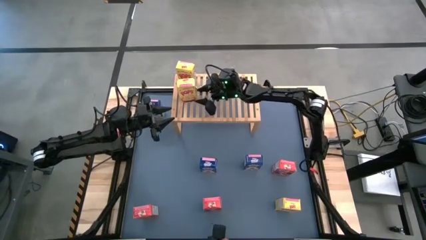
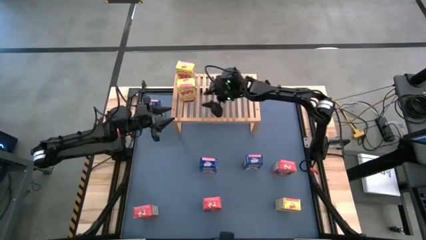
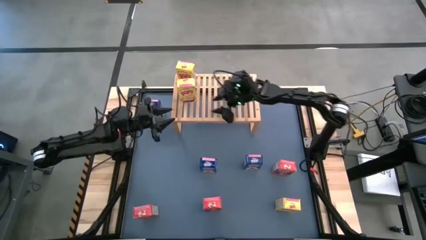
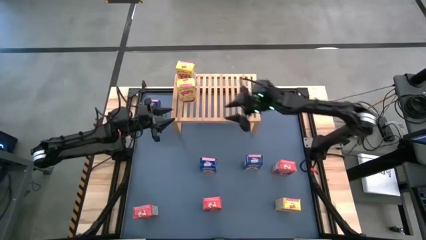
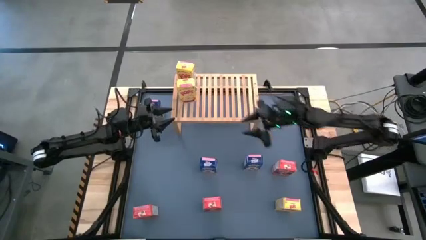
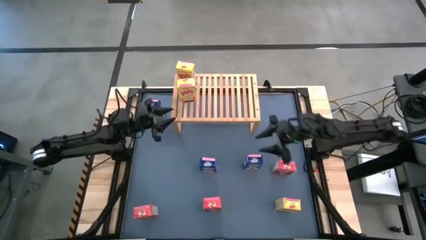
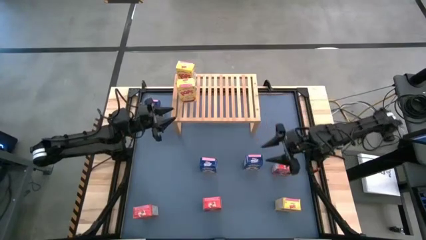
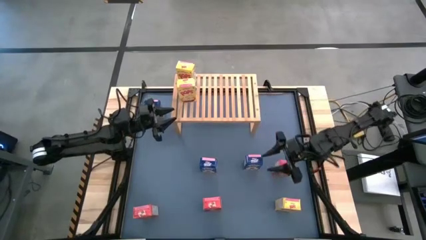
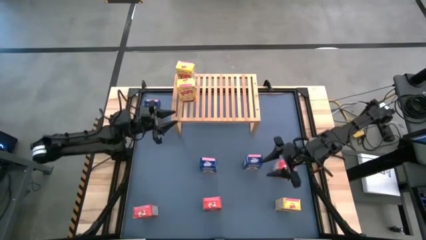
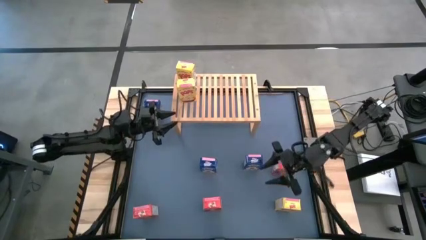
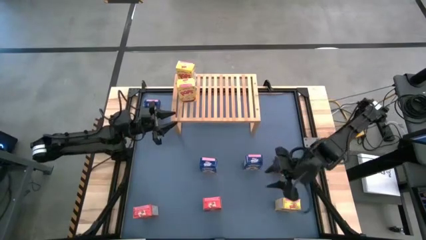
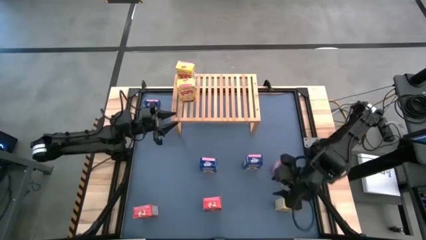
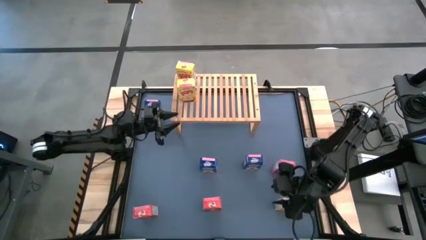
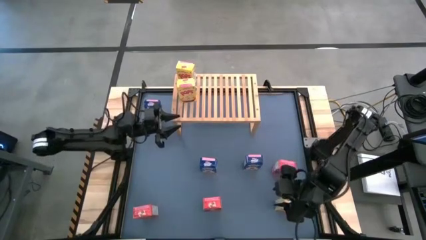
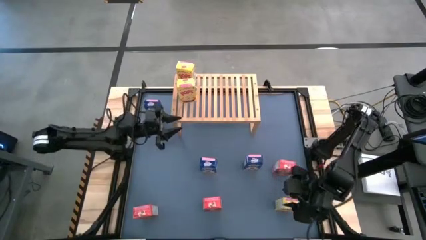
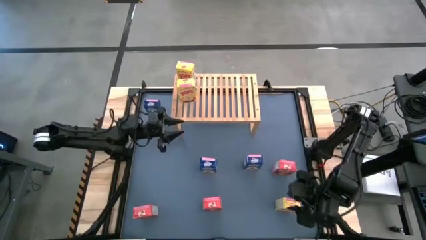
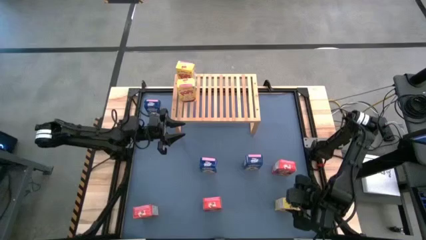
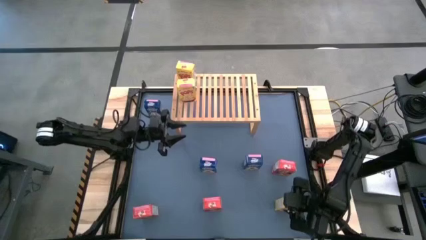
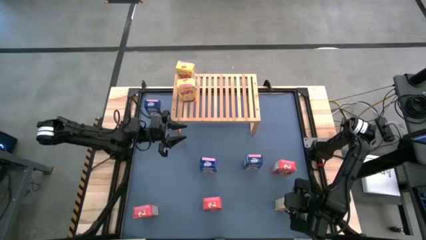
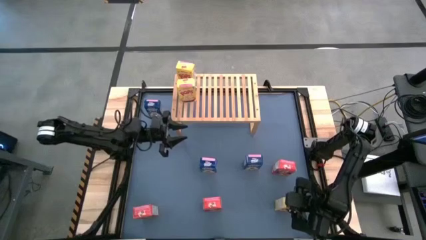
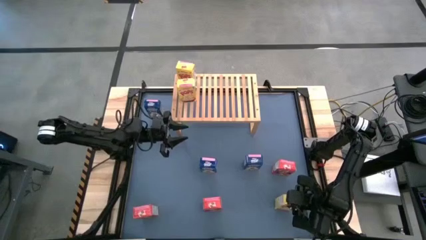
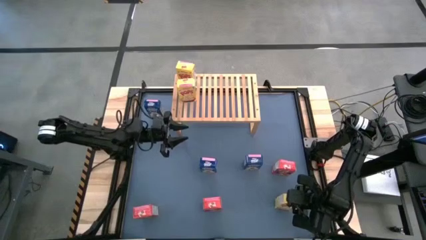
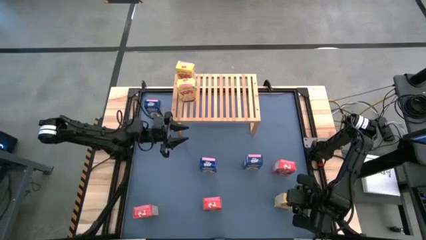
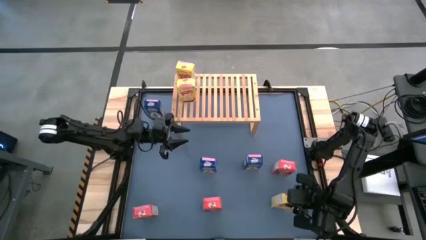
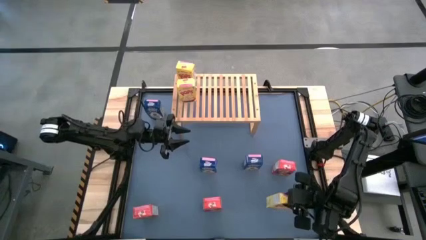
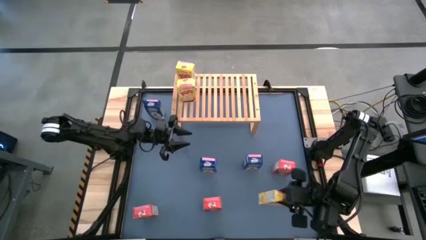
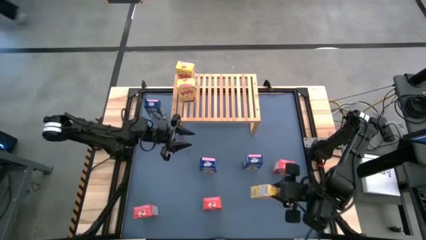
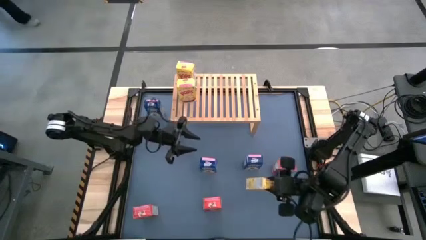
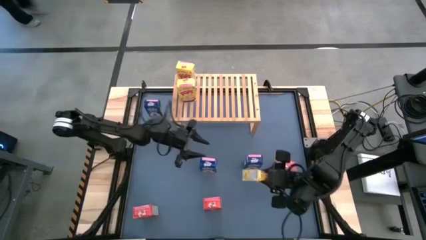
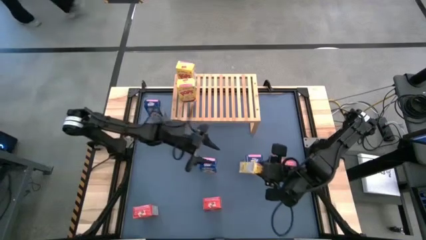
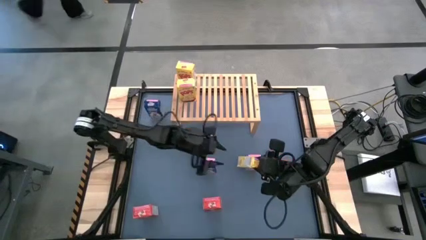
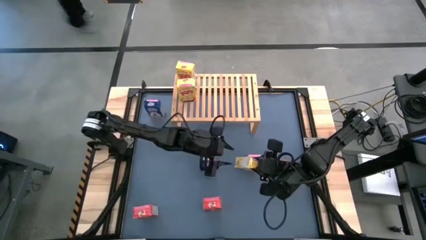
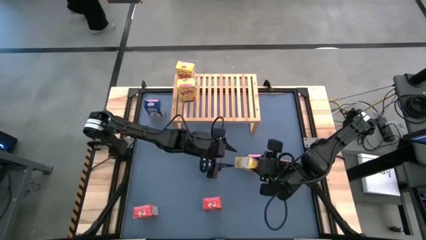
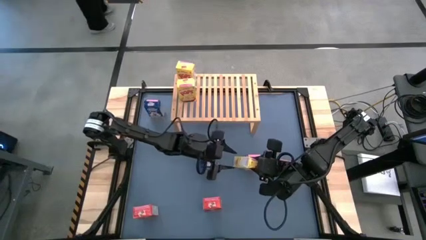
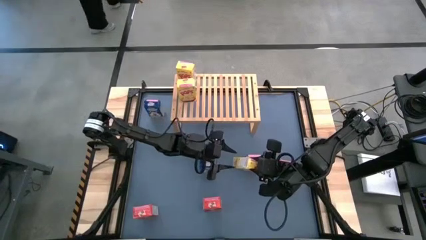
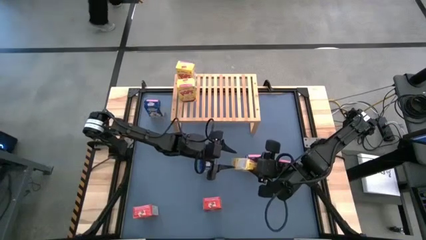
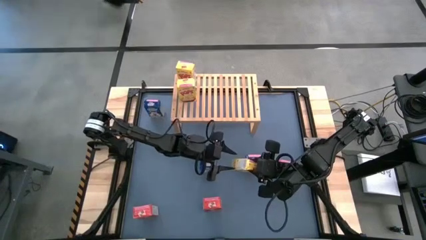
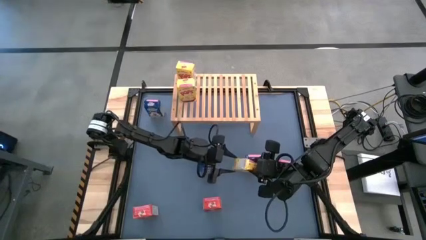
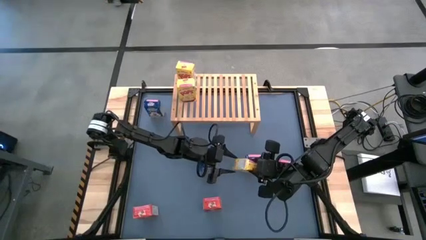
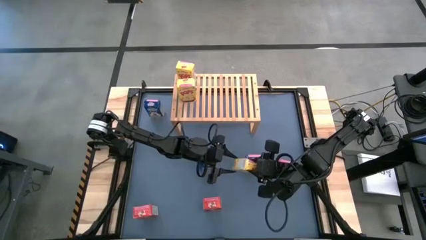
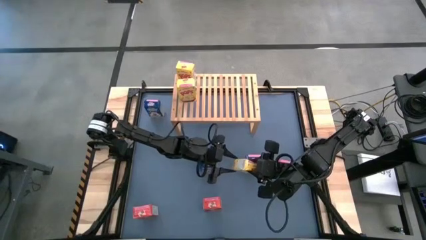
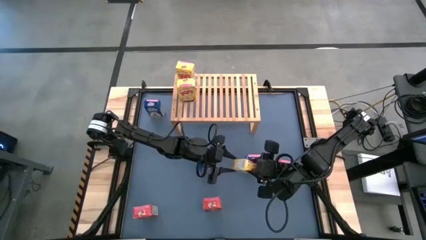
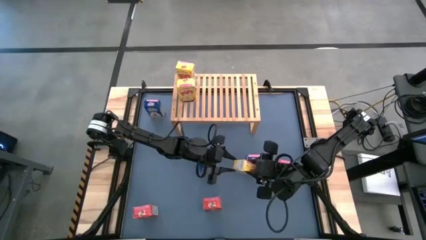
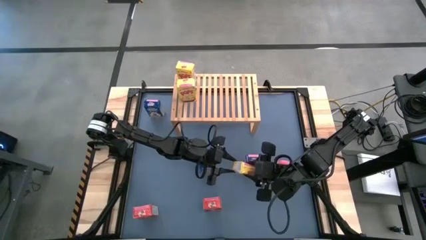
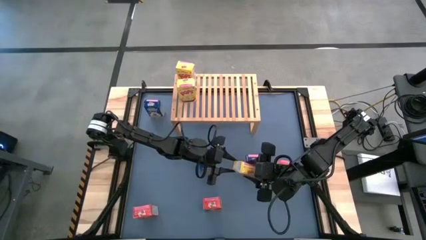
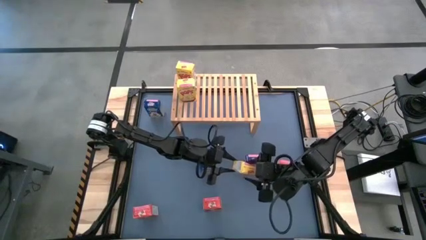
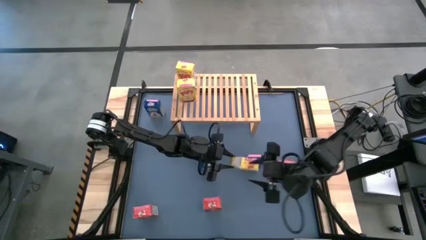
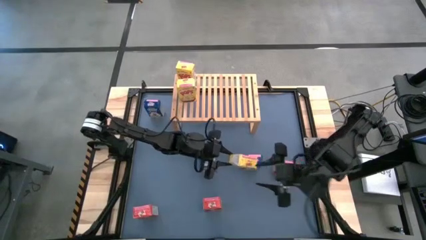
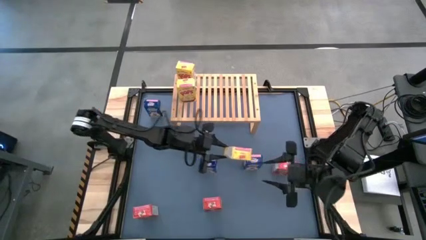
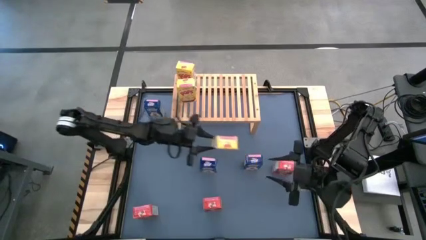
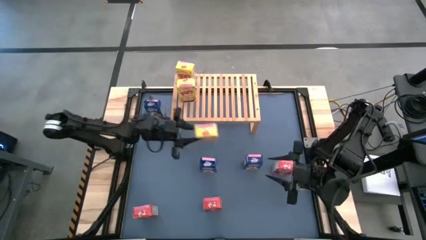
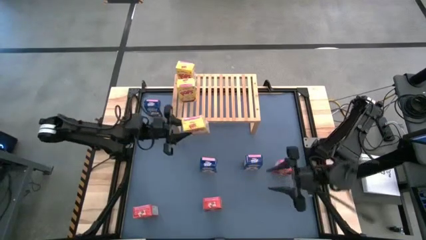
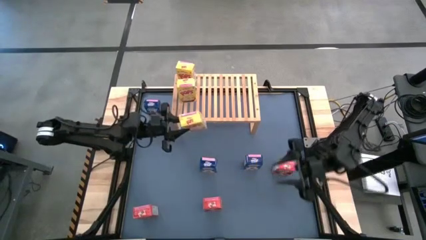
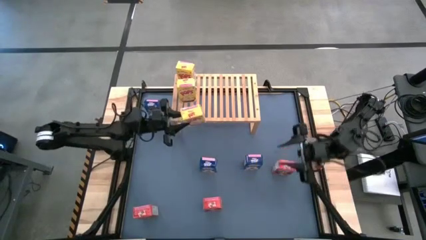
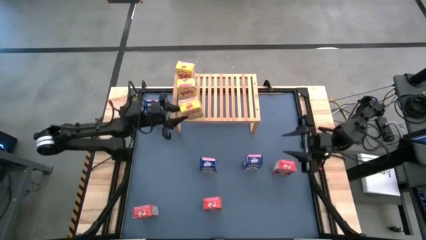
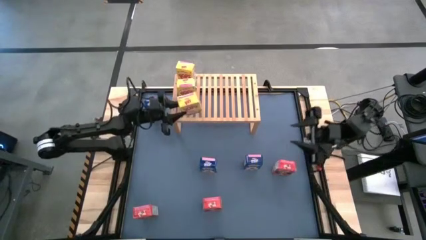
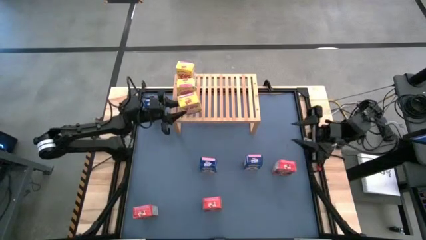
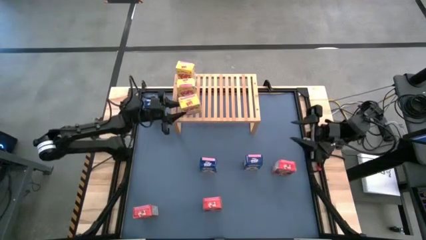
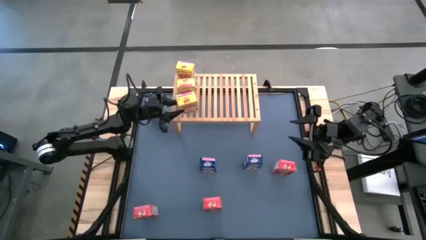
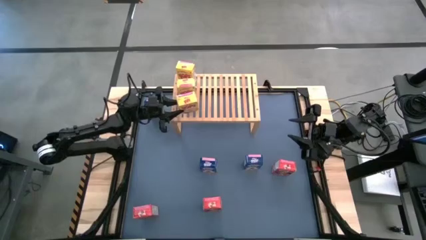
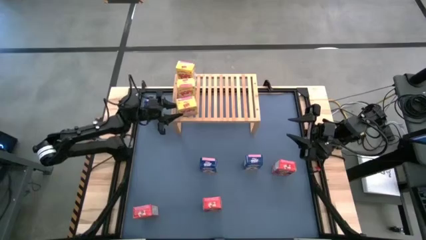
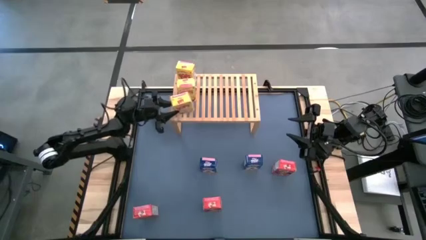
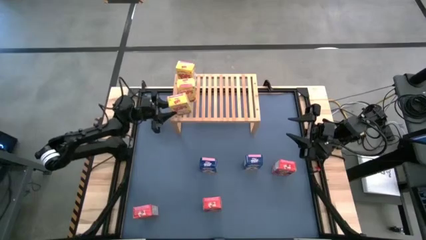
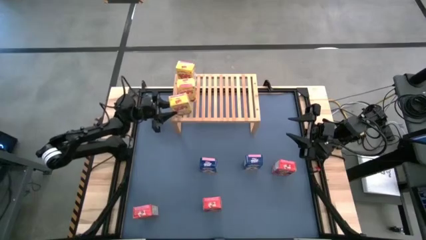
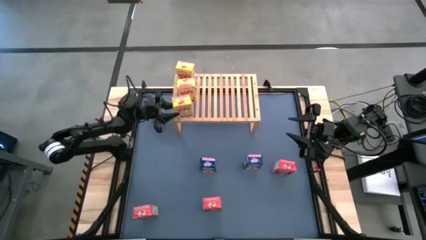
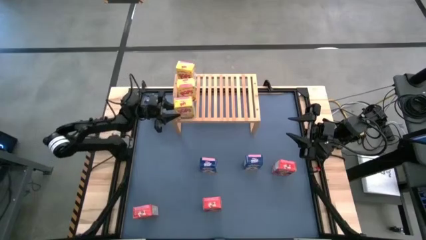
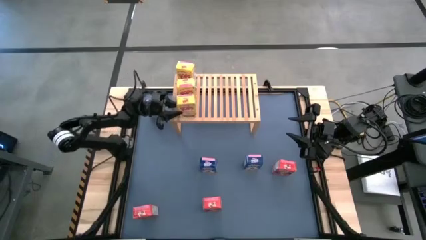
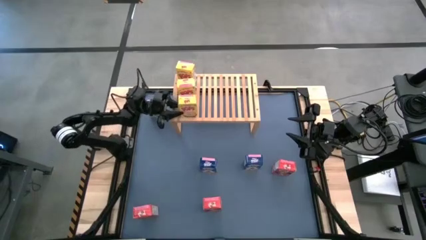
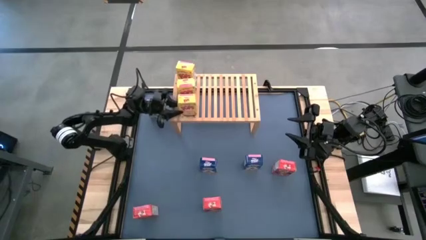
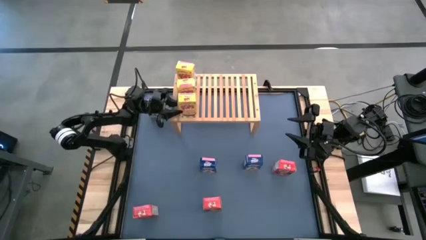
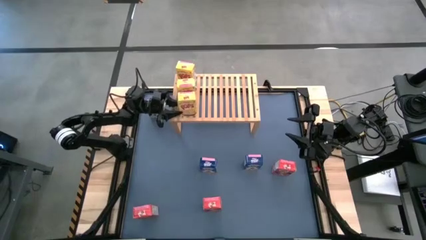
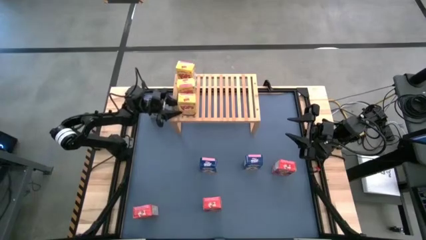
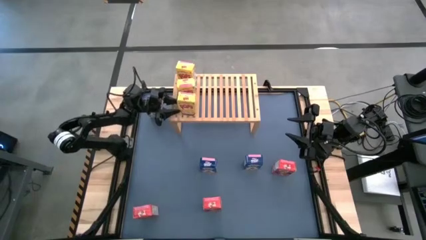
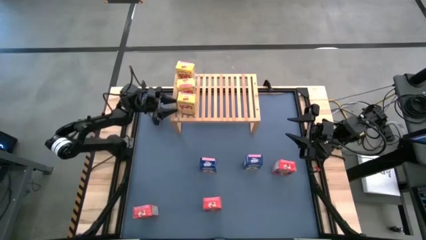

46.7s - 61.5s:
Task: Stack cereal on shelf
Put the yellow cereal box on the shelf aligned with the other yellow cereal boxes
